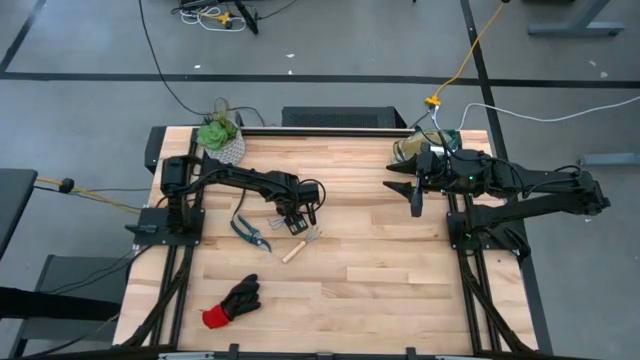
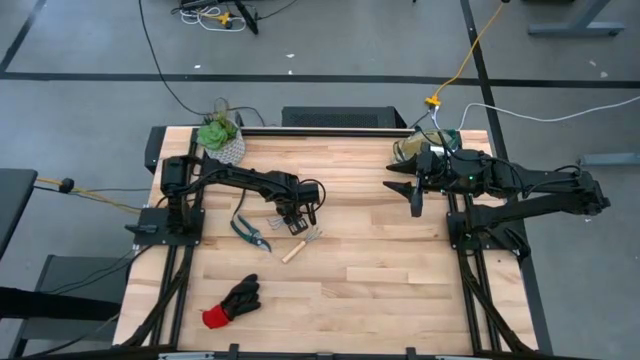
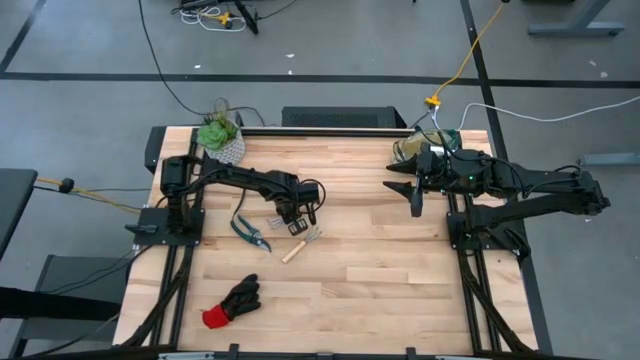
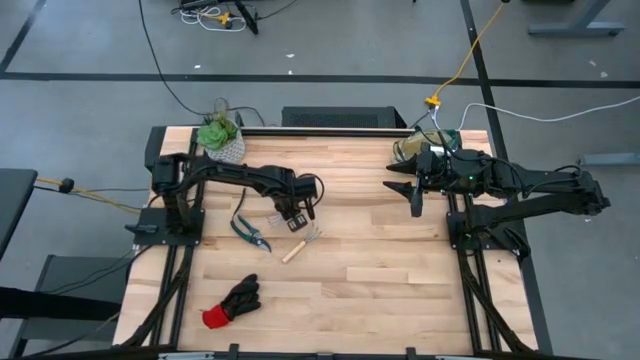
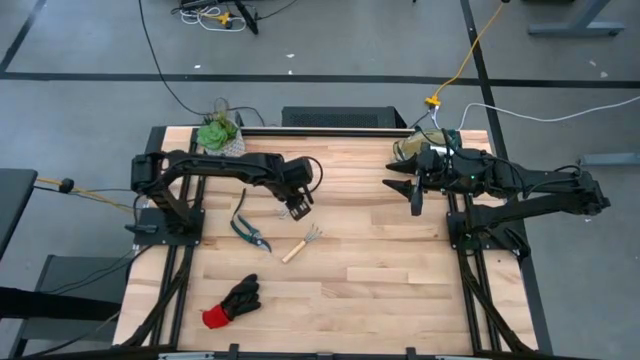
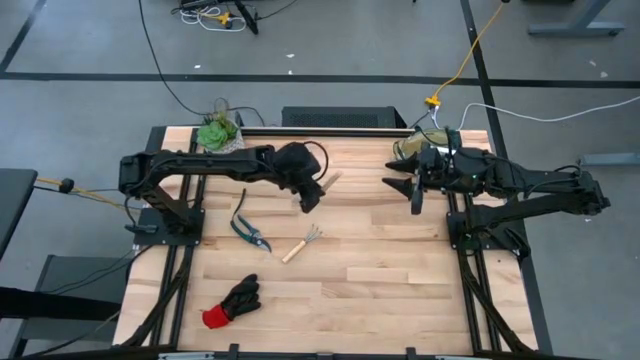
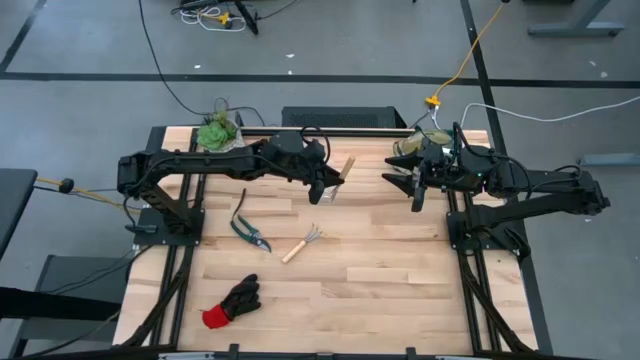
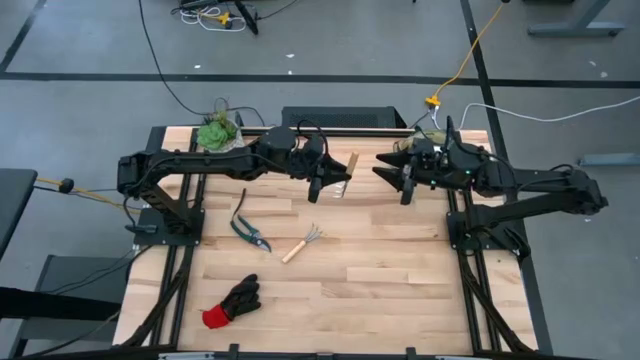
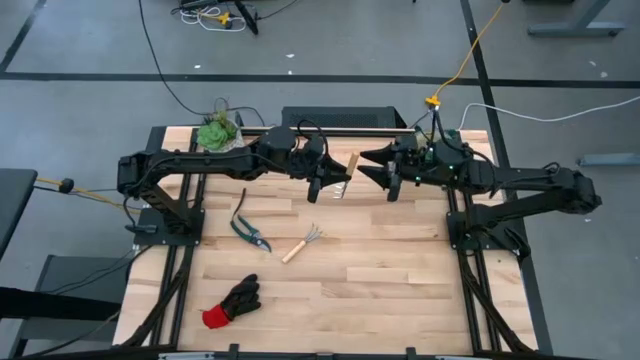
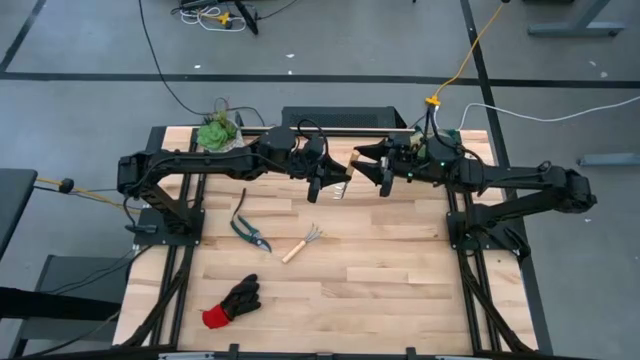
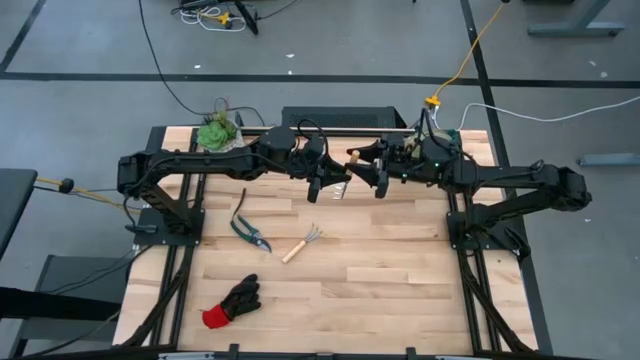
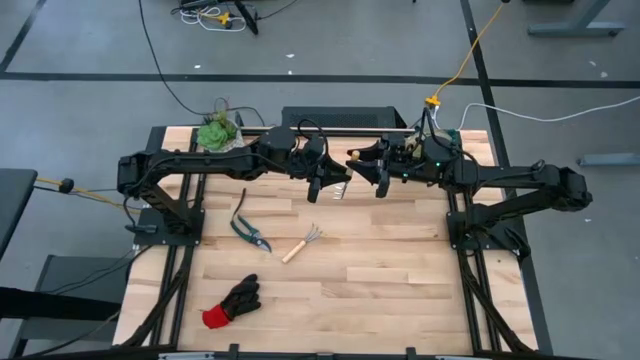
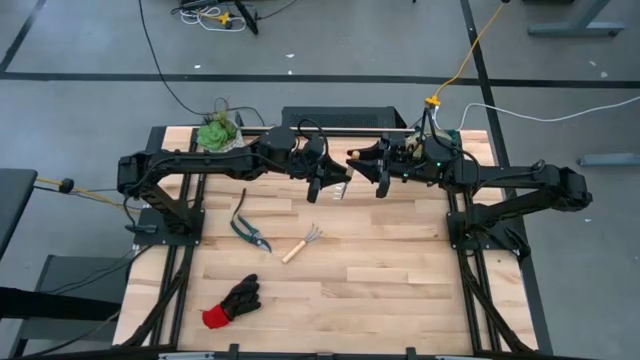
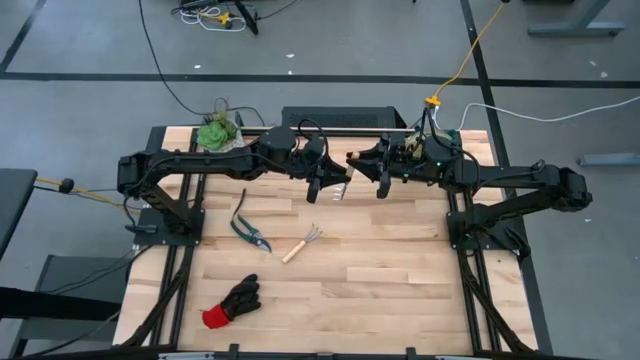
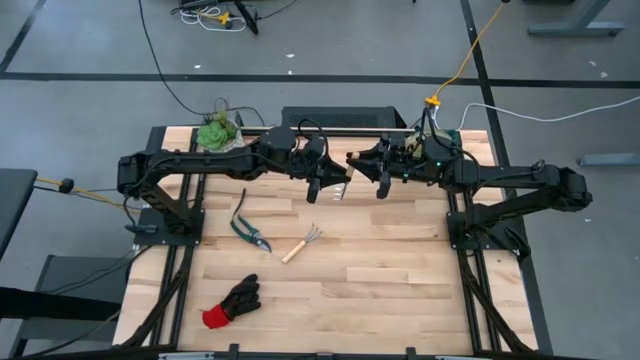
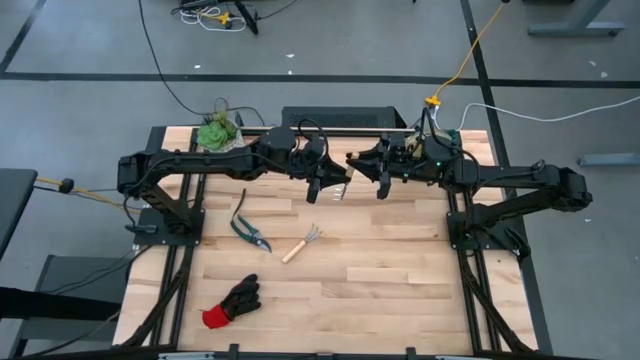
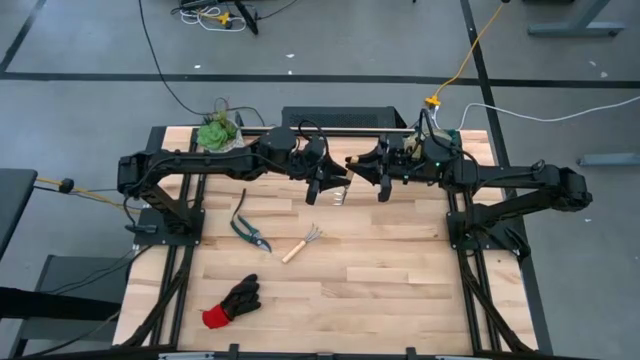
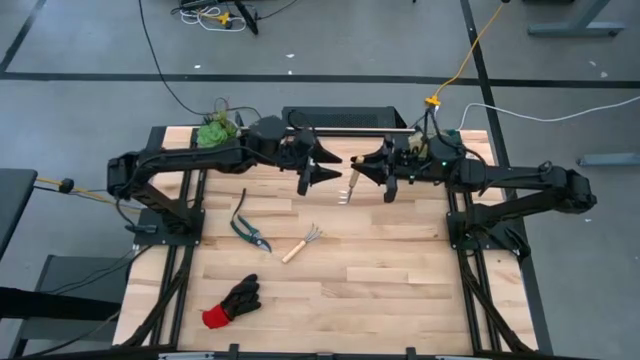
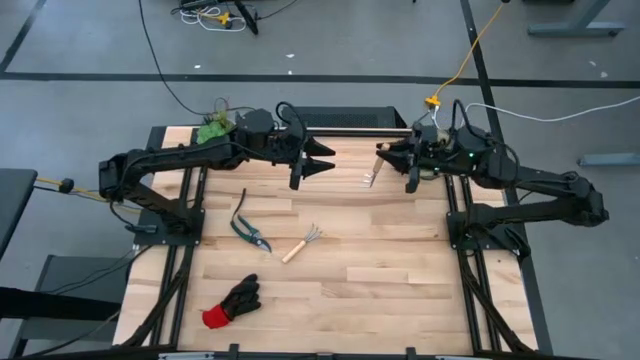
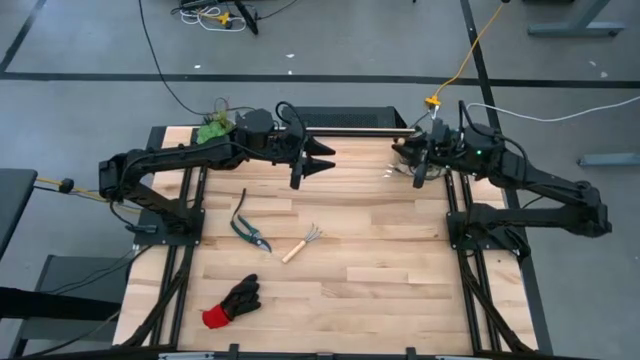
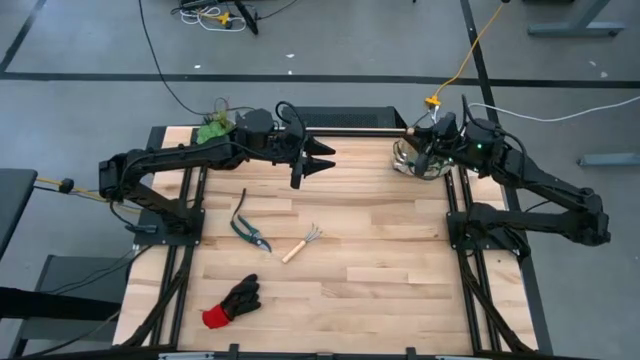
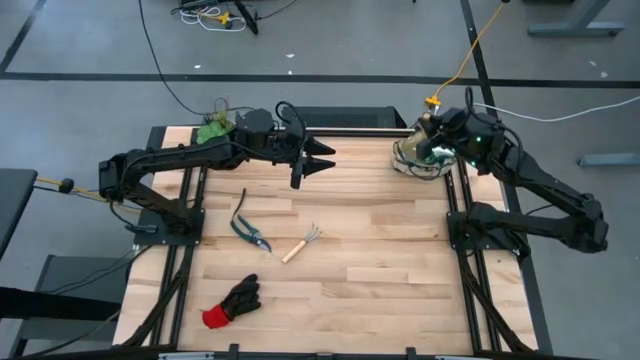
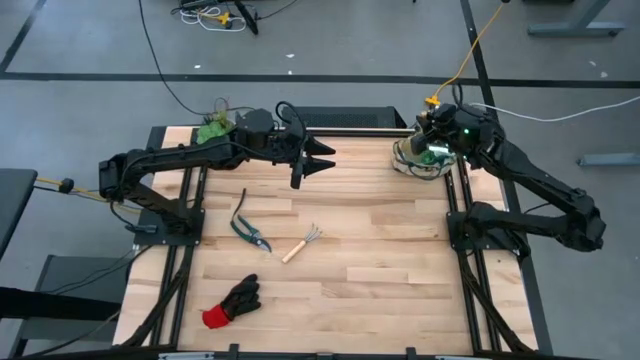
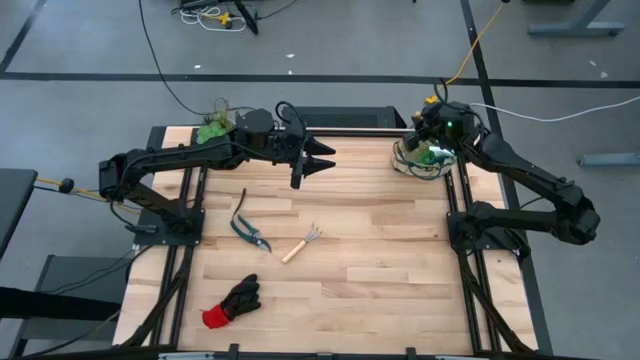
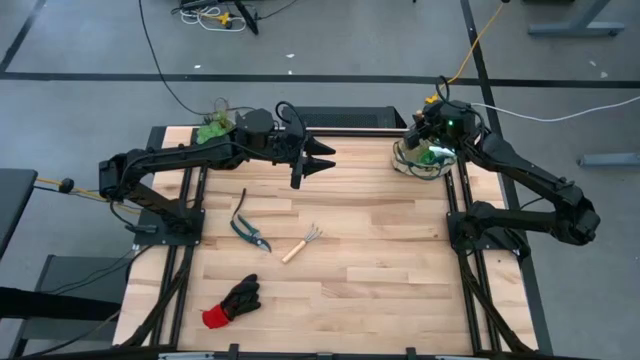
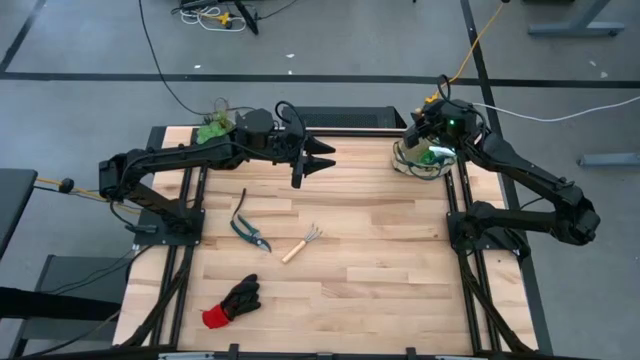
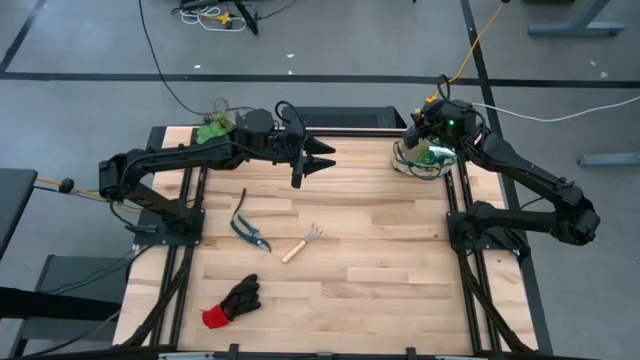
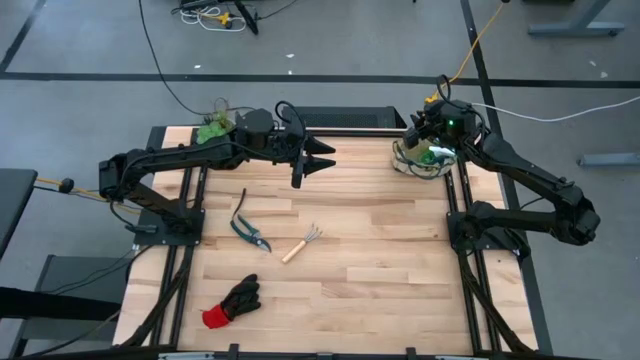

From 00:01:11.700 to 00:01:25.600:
Task: Pick & Place Garden tools in Gardening bag
Put the top brown hand rake into the brown gardening bag

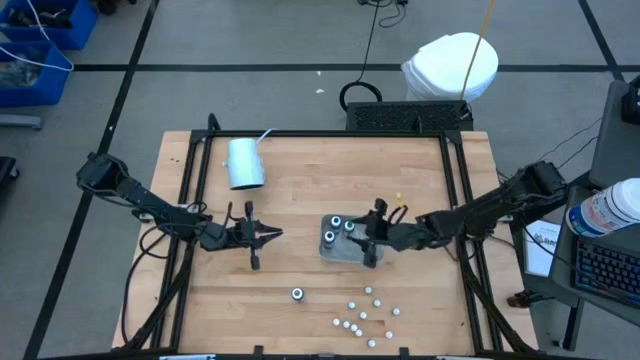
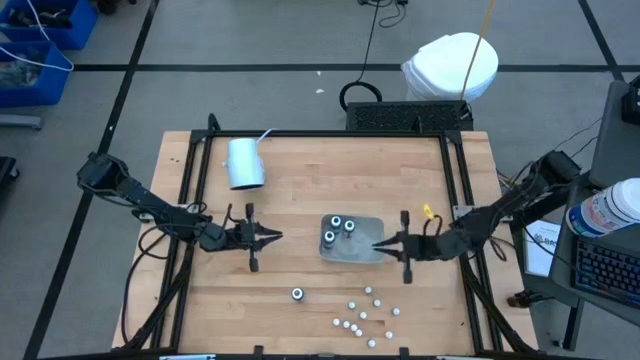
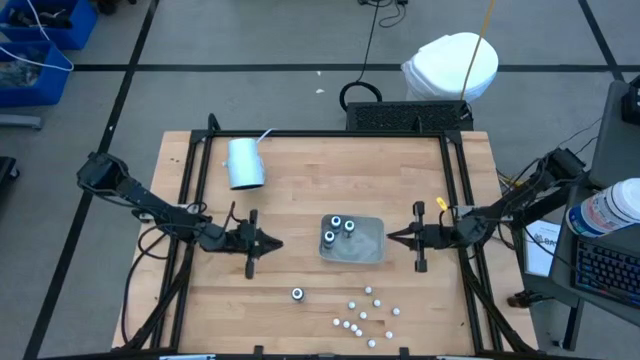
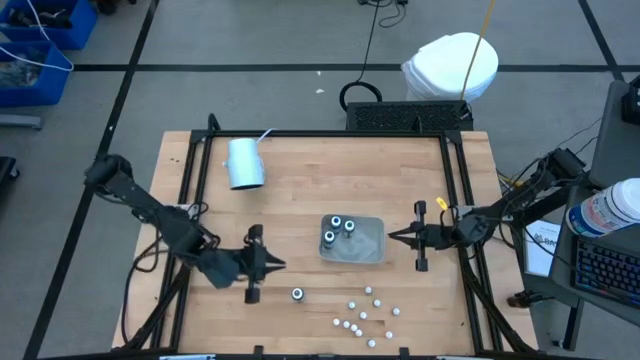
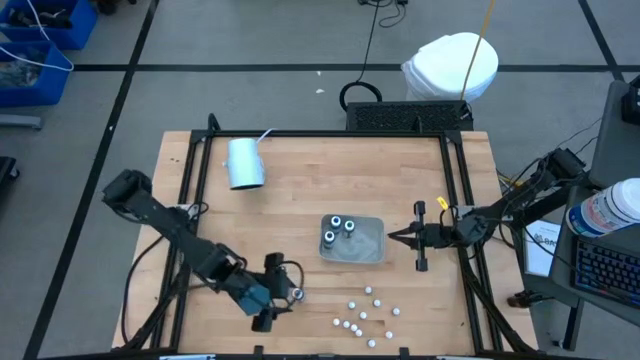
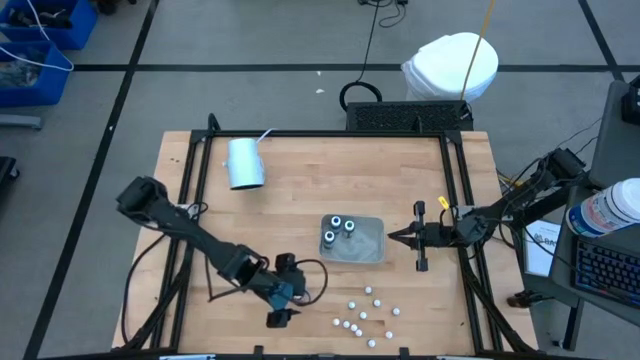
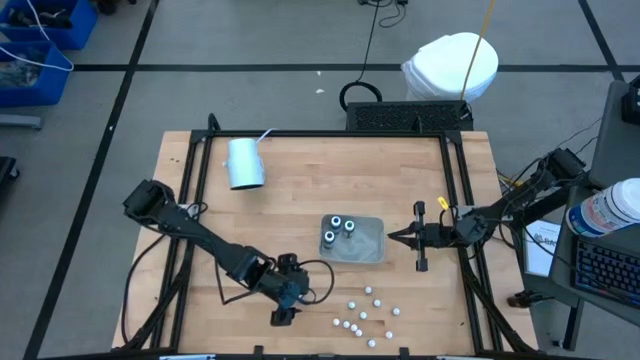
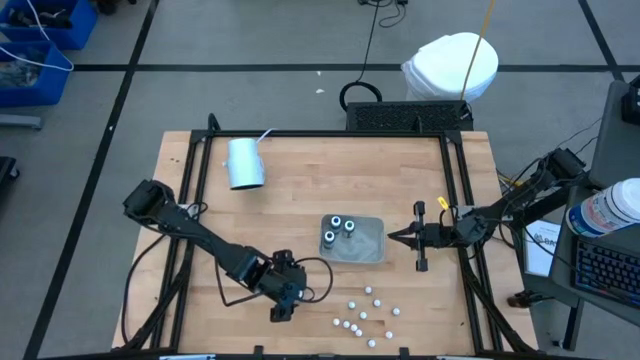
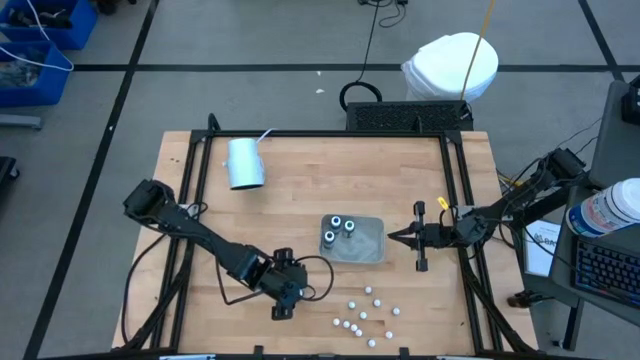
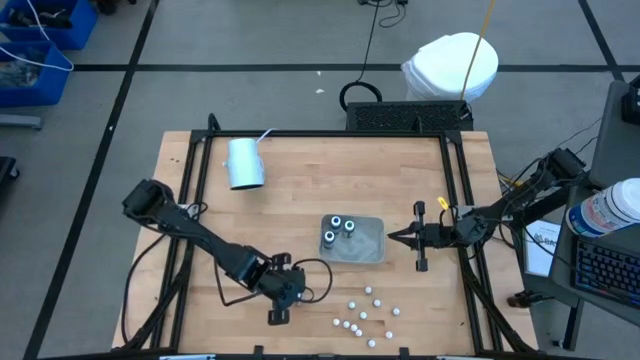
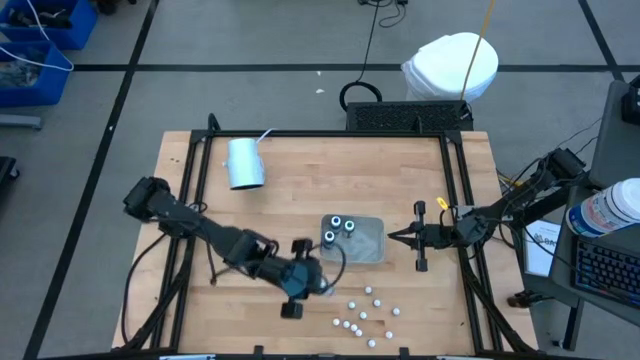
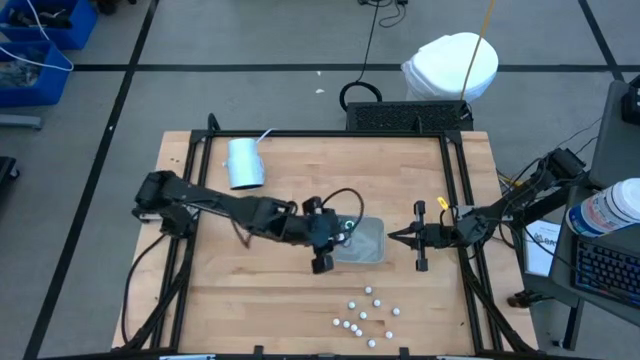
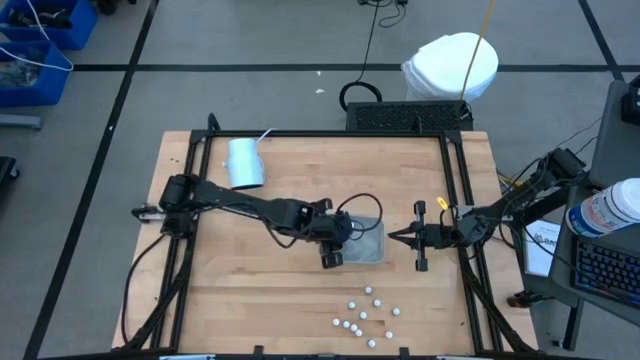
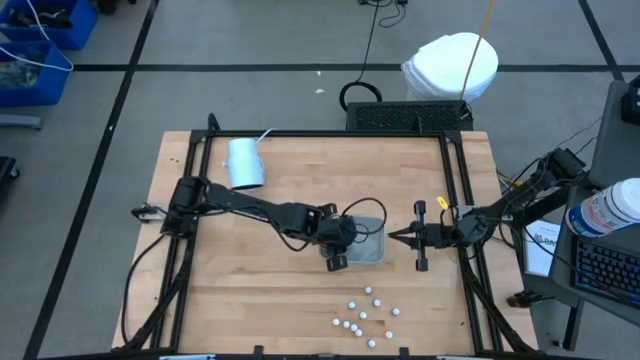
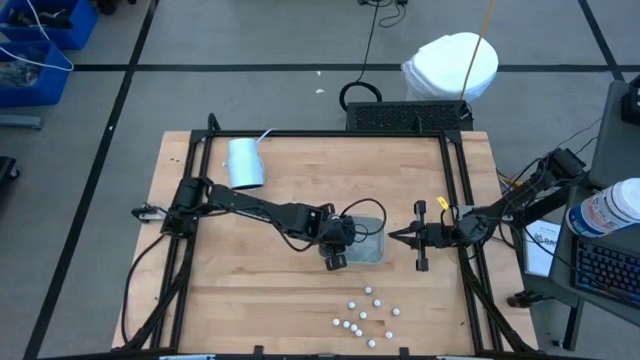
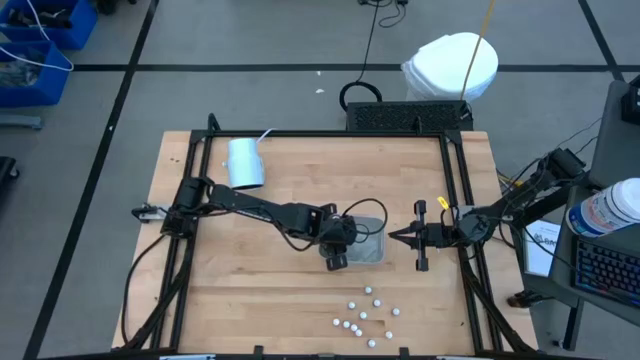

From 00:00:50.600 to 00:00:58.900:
Task: Pick & Place food coloring
Put the large purple food coloring bottle into the gray bin
